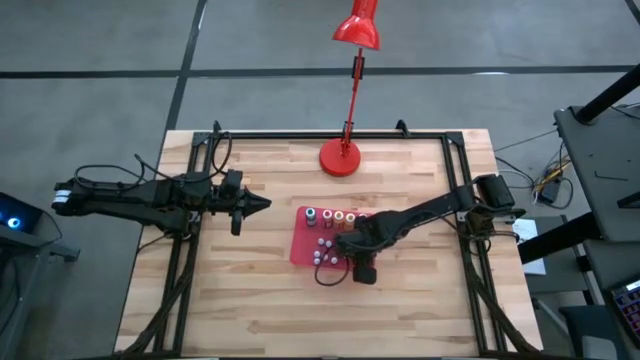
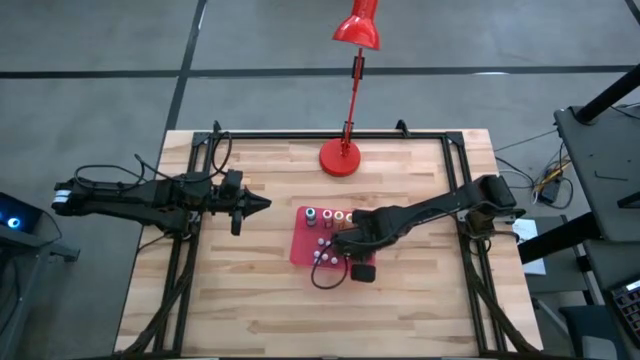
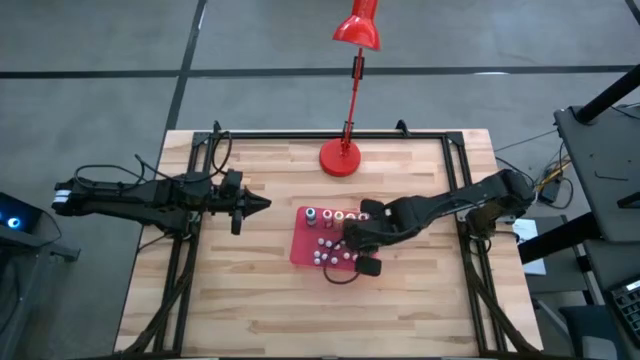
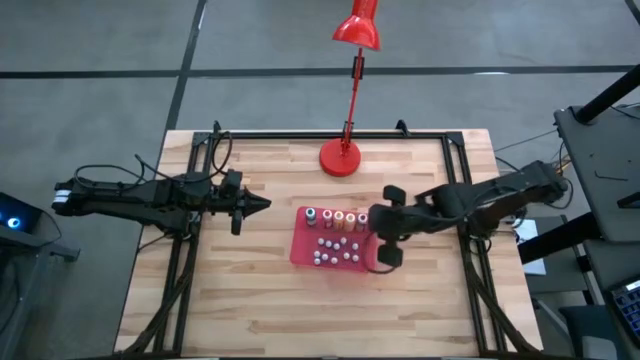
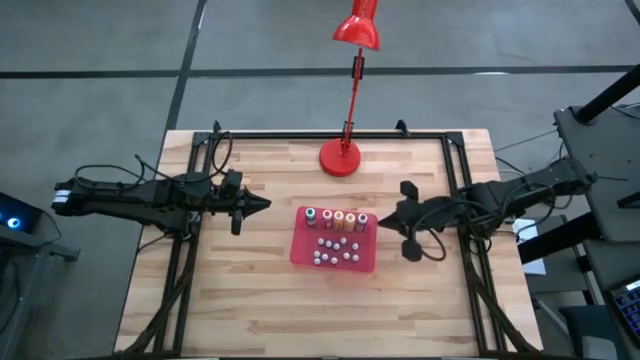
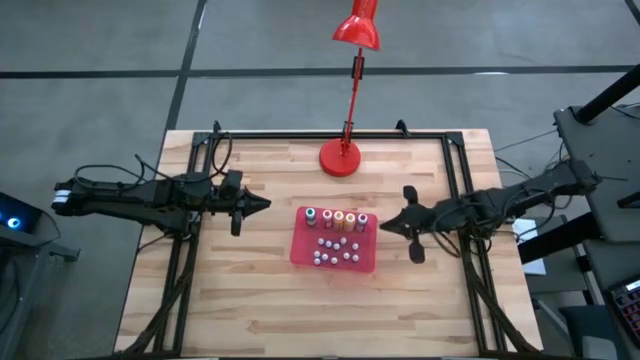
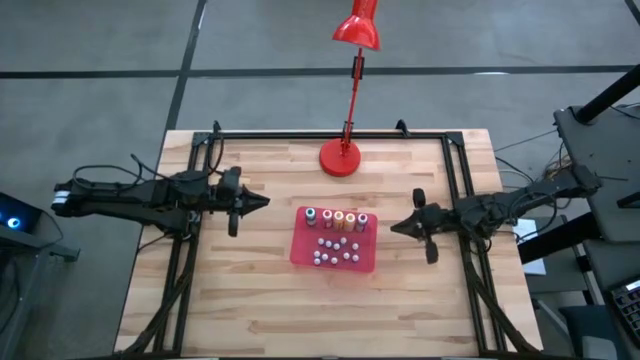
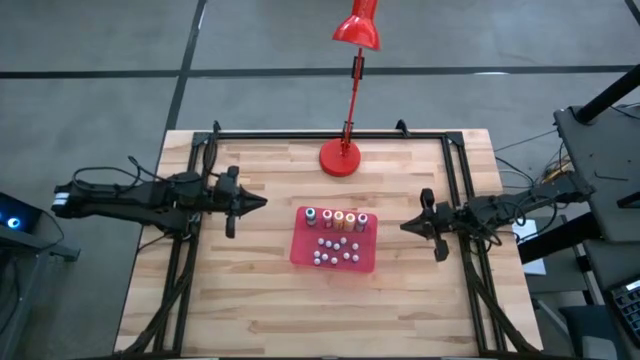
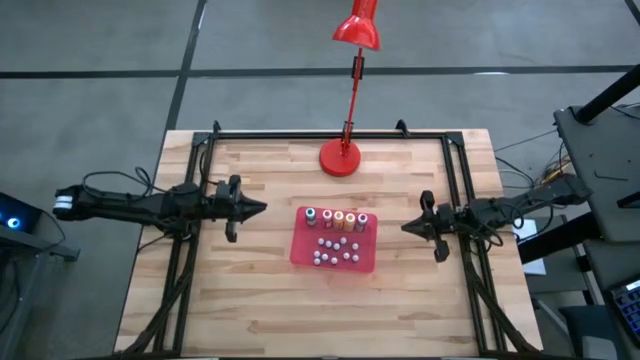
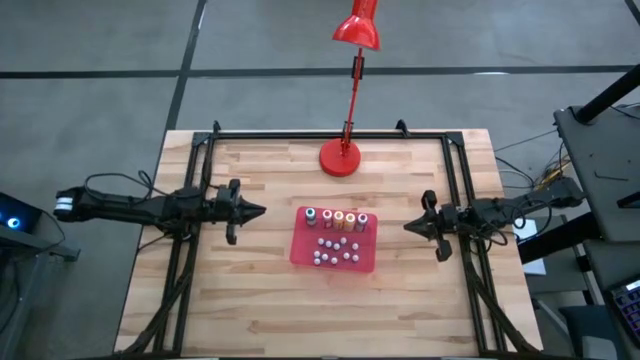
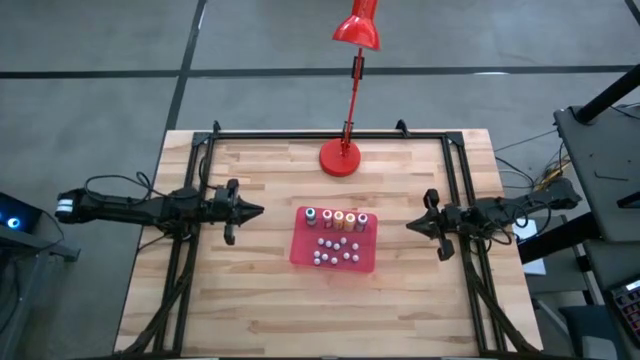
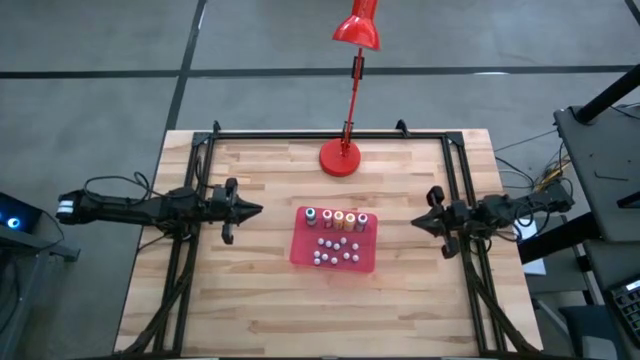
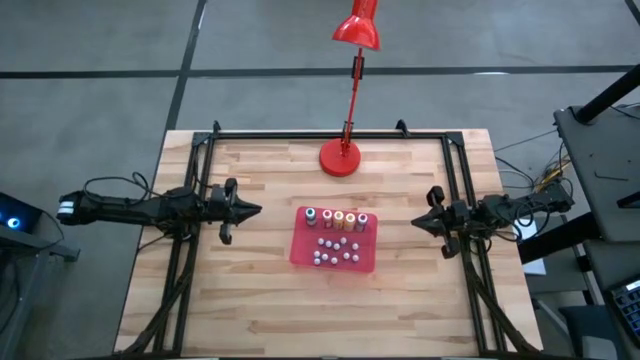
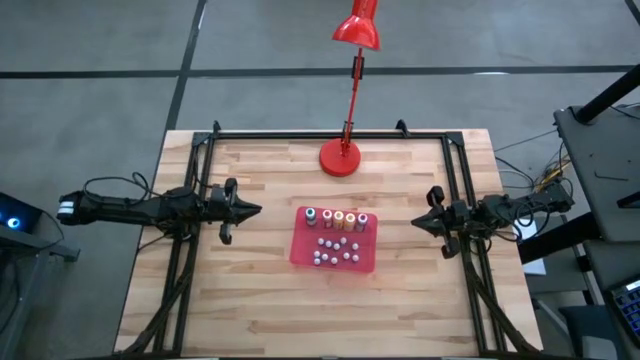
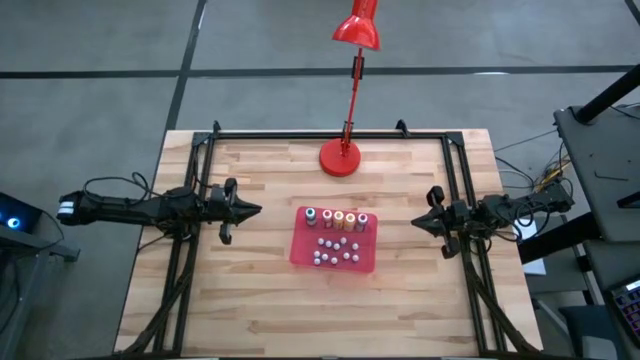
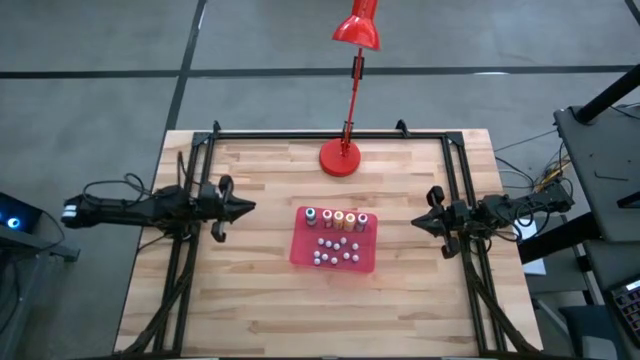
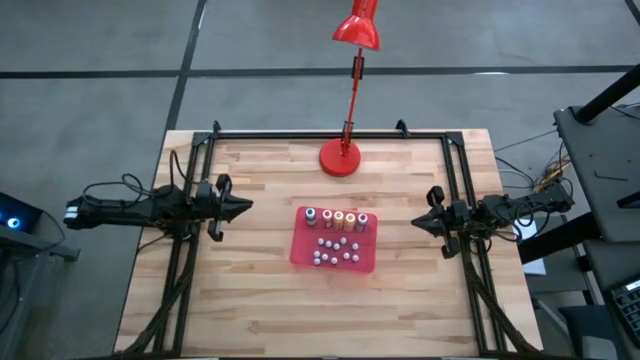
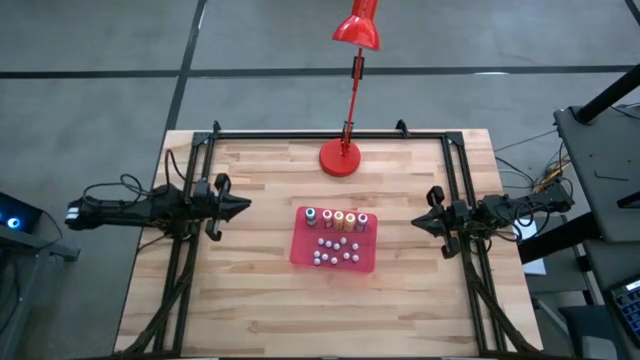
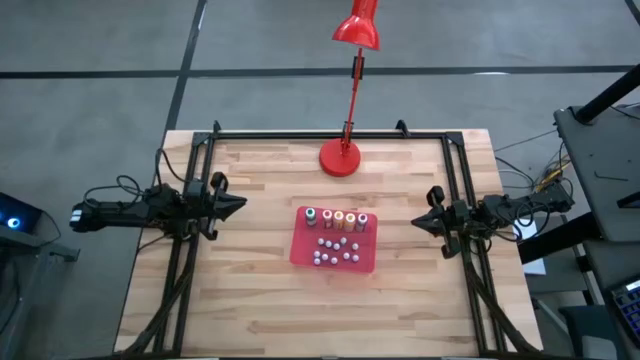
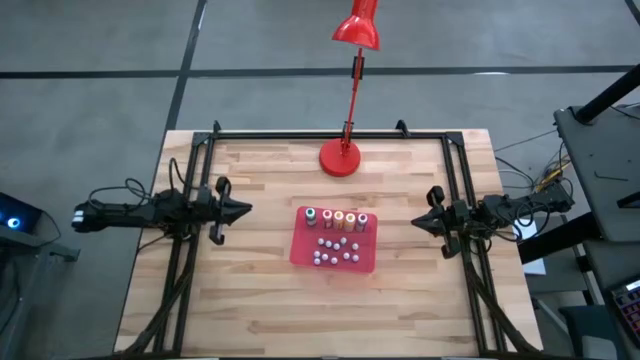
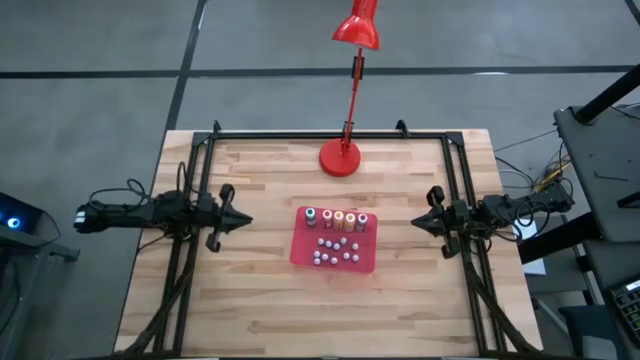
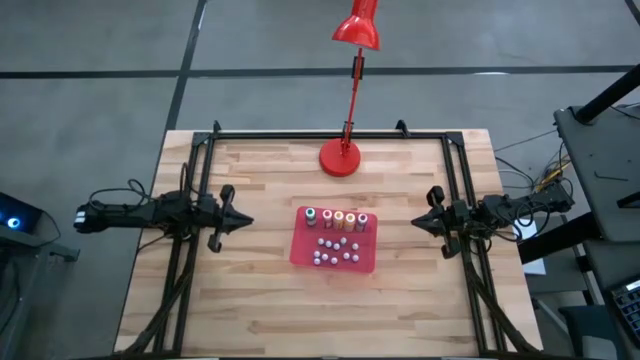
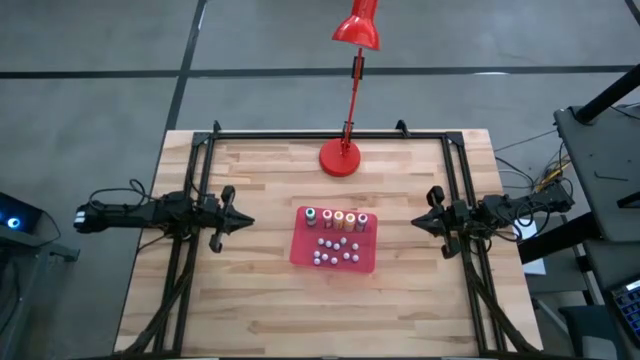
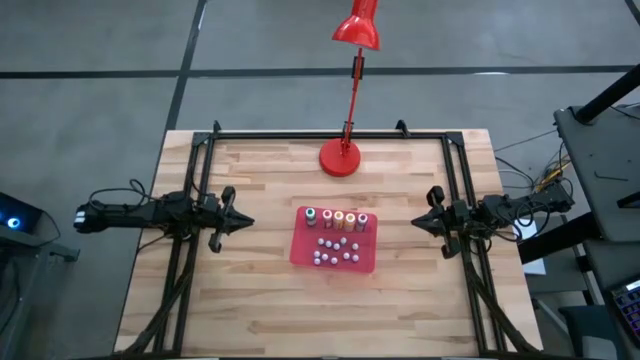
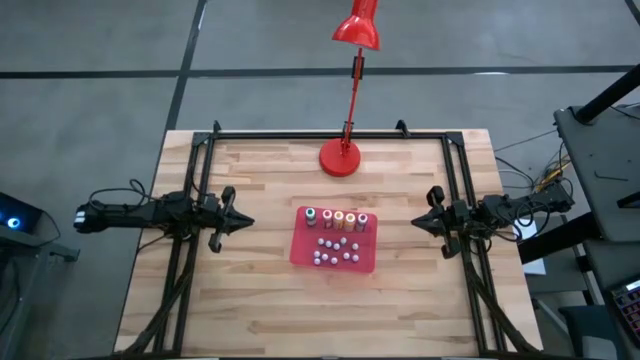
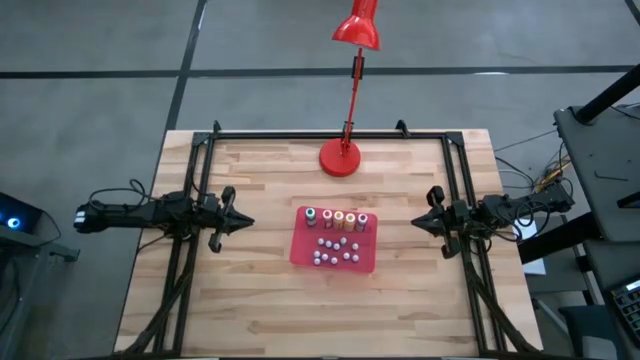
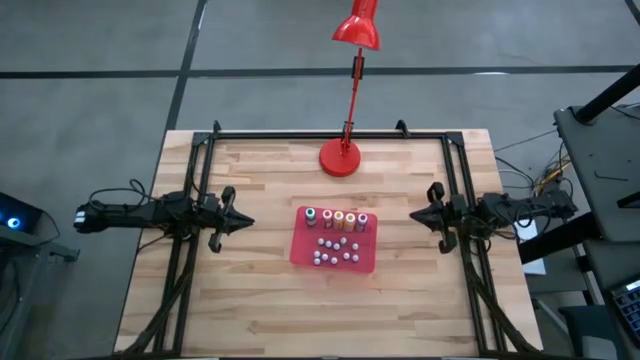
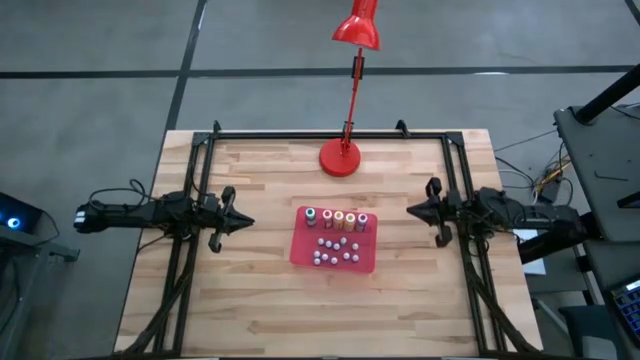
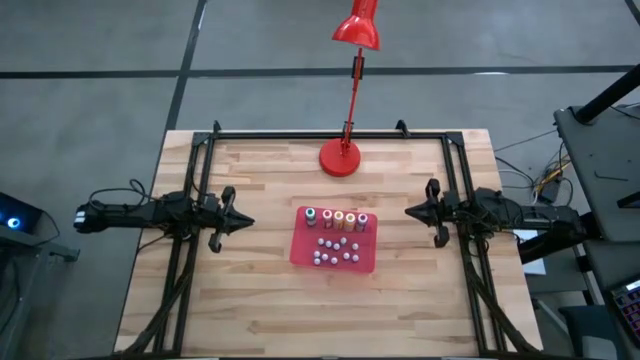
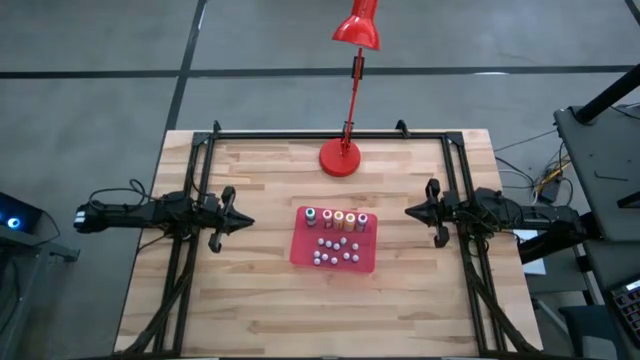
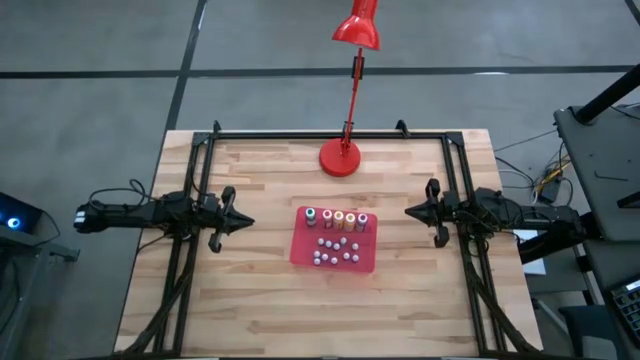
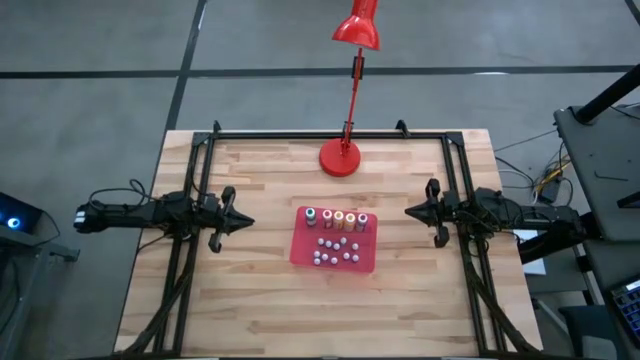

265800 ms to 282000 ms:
Task: Pick & Place food coloring
Return to Home Position

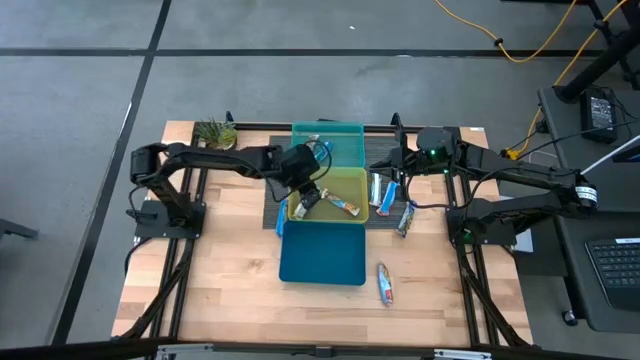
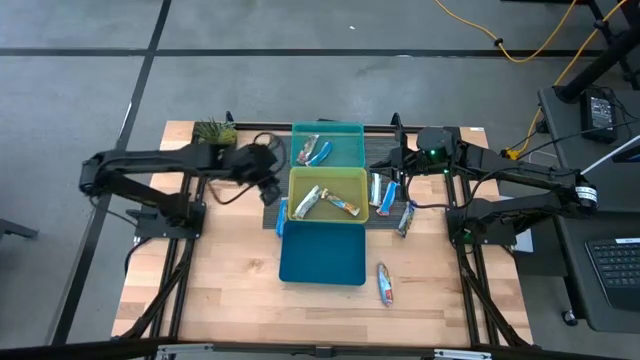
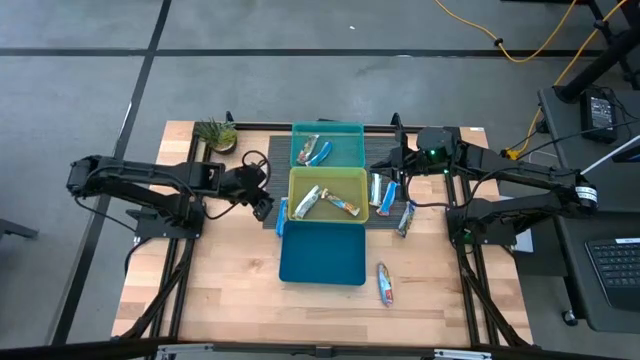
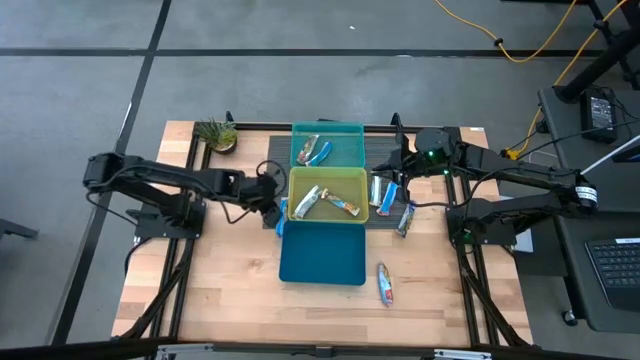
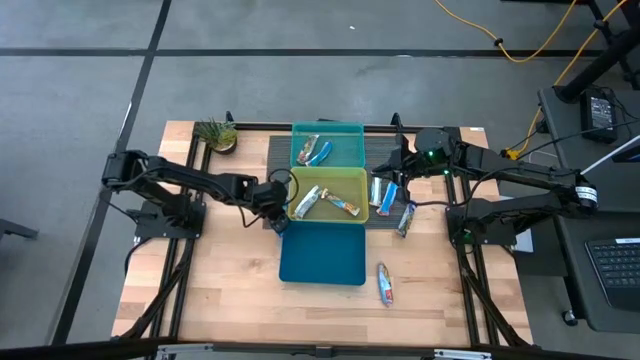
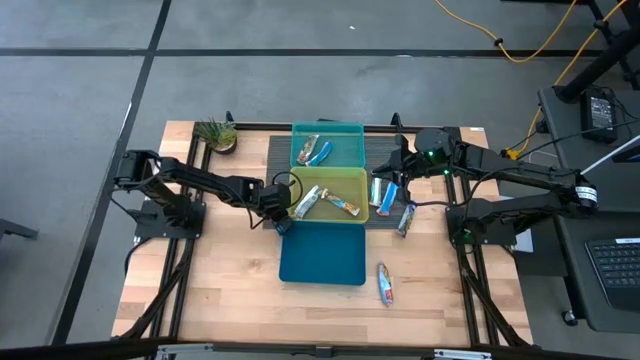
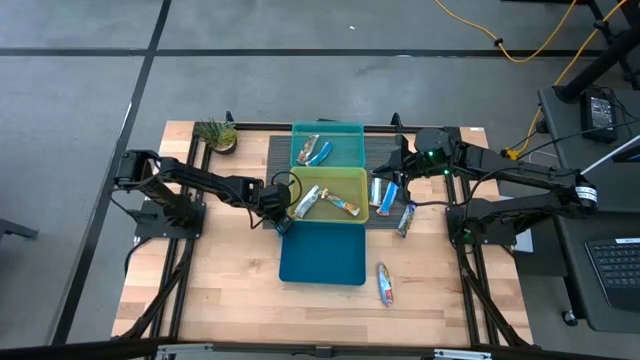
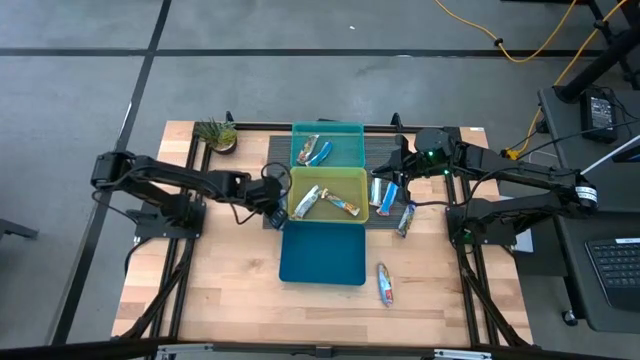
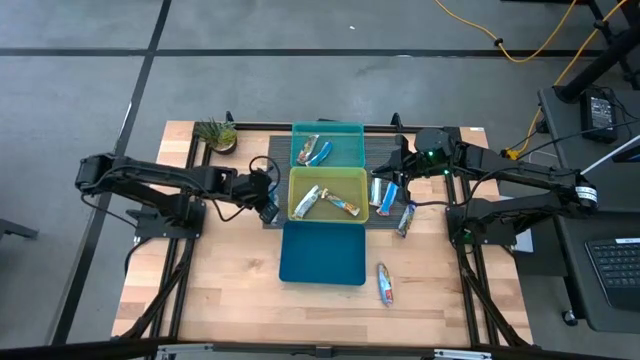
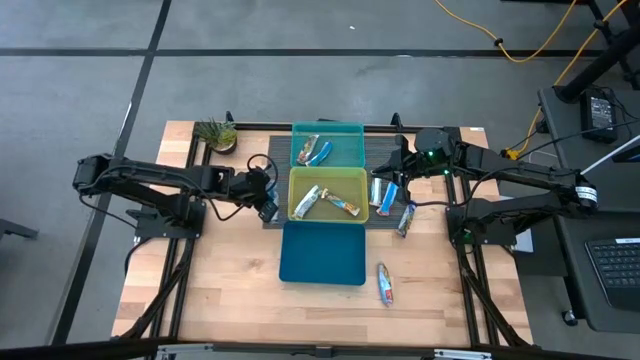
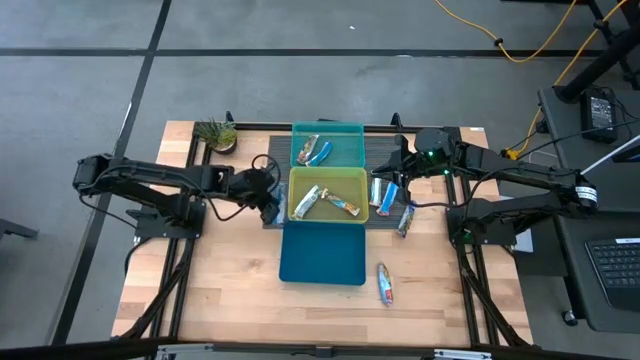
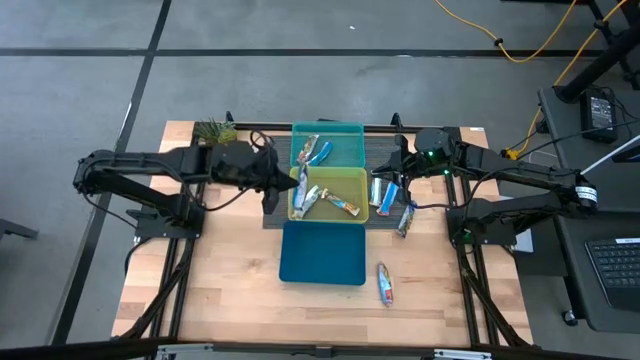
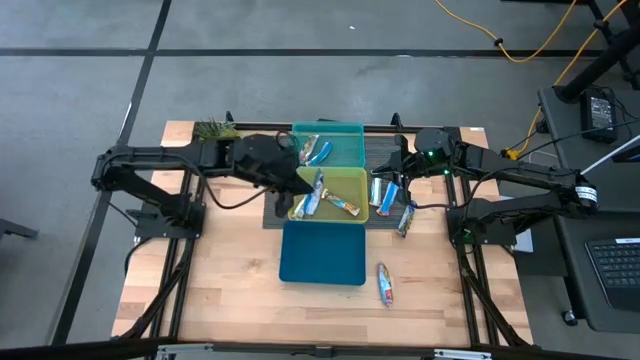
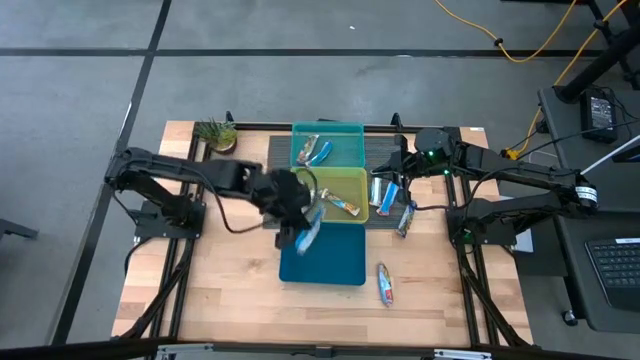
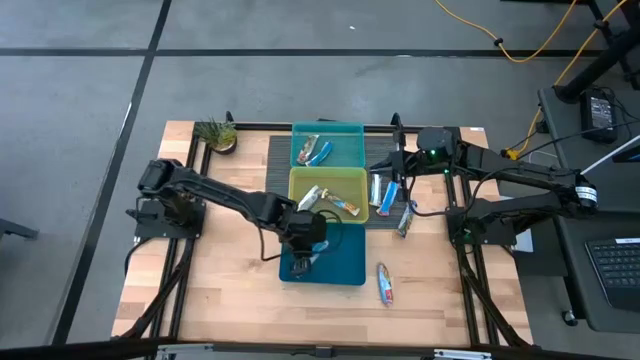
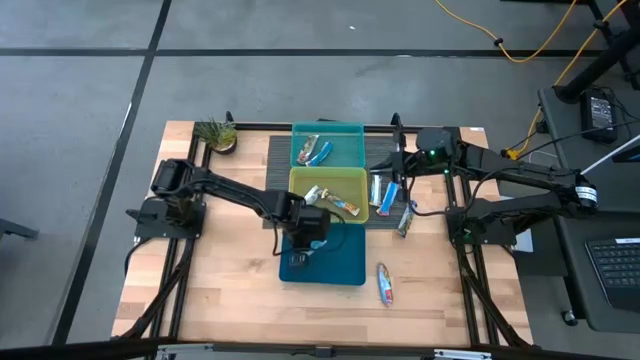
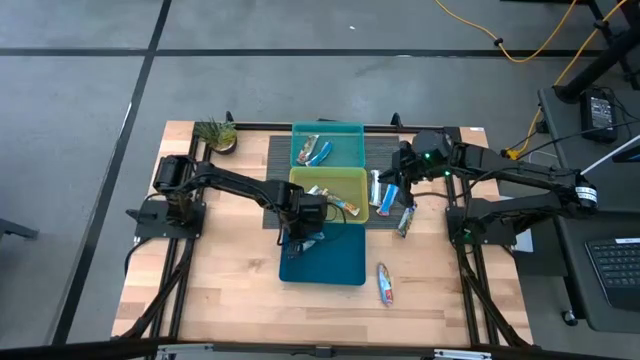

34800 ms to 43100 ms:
Task: Pick and place Granola Bars by type
Put the blue granola bar into the blue bin
